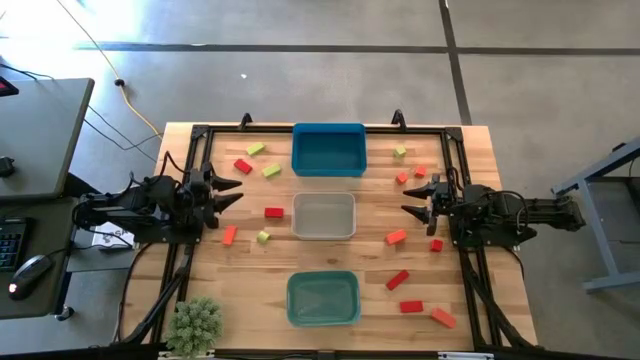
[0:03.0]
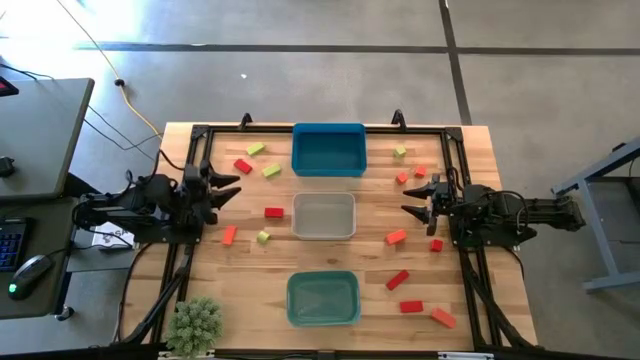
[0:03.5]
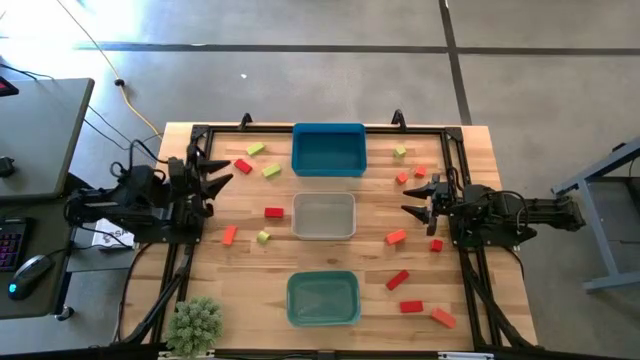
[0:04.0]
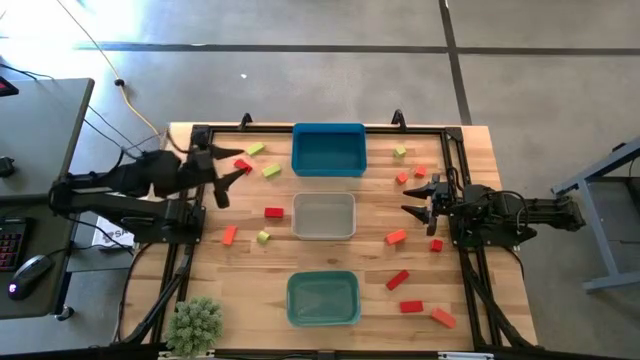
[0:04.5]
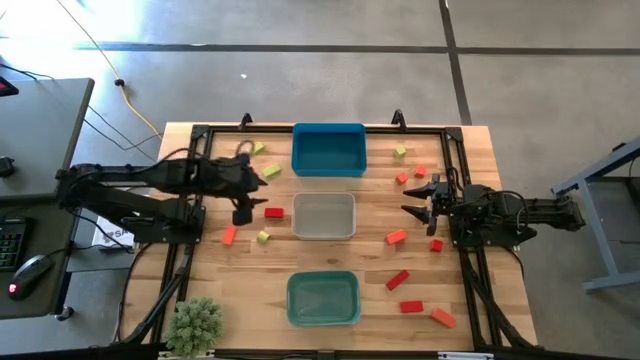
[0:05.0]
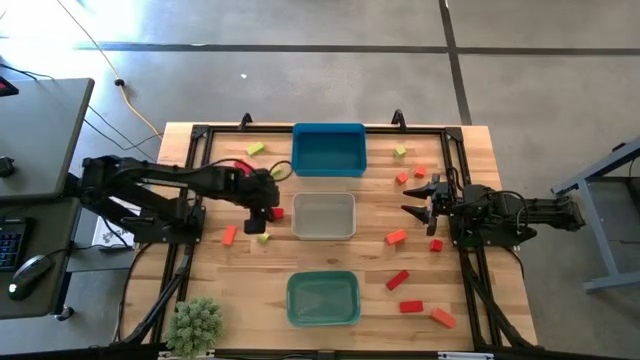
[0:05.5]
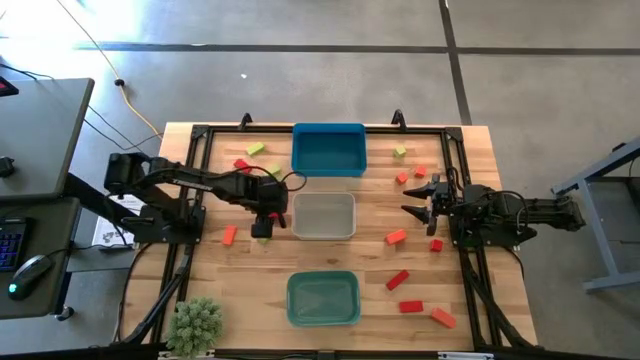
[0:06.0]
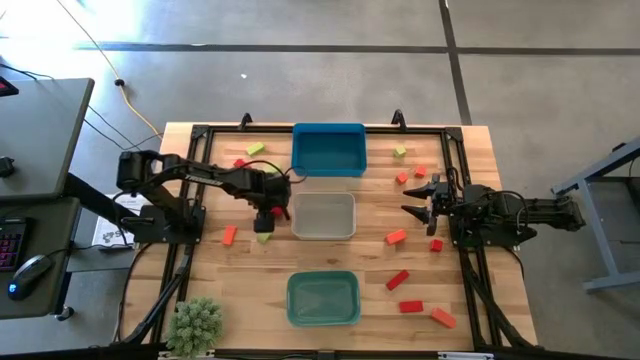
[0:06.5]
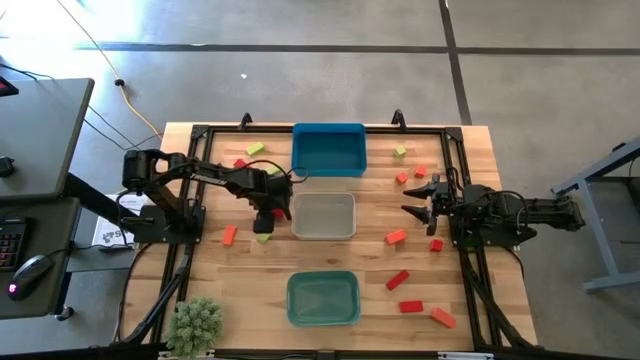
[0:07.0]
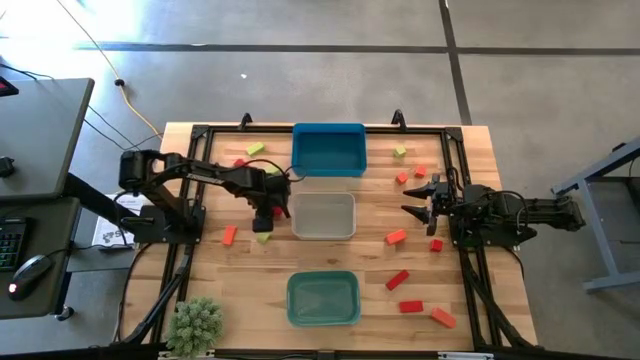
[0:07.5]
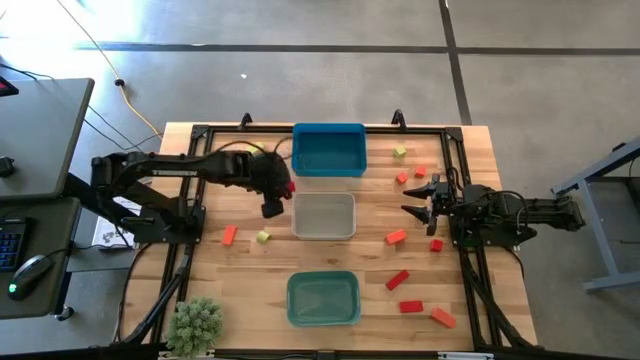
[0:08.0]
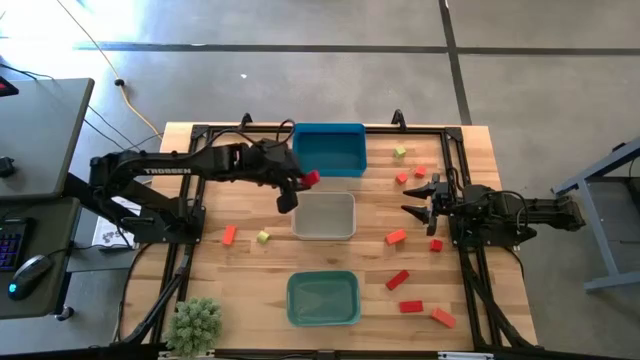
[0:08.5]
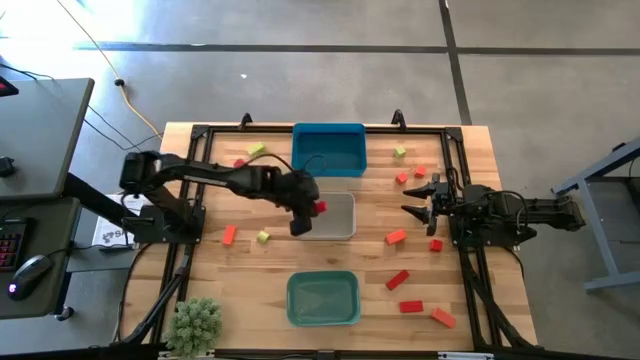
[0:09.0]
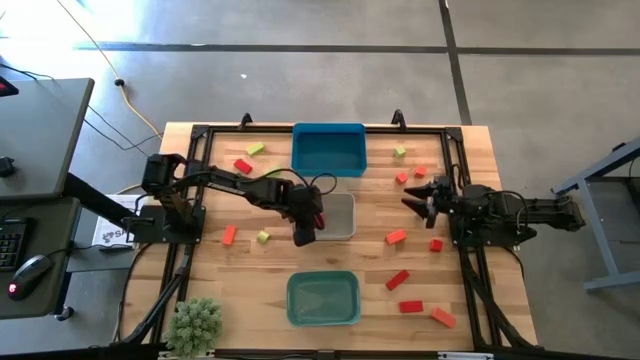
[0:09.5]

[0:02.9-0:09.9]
Task: Sort & place blocks by color
Put the red block into the gray bin

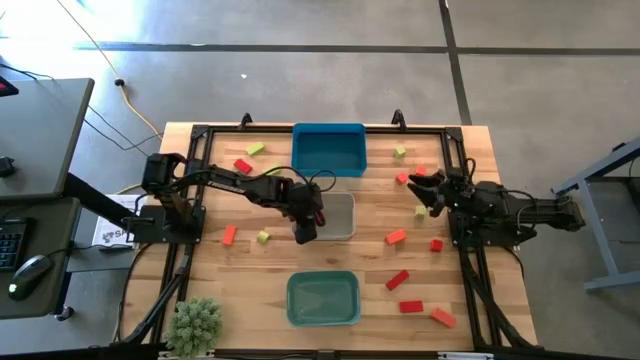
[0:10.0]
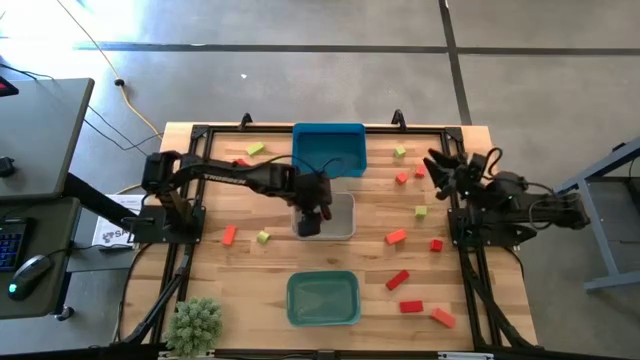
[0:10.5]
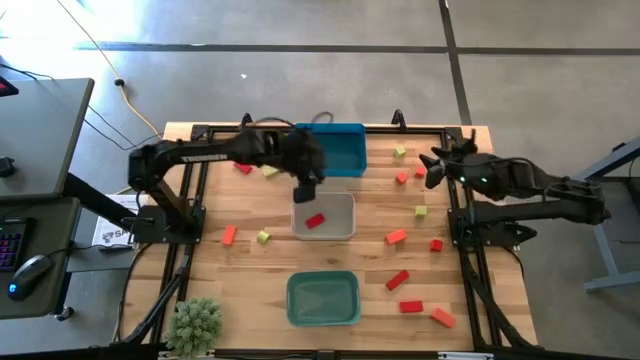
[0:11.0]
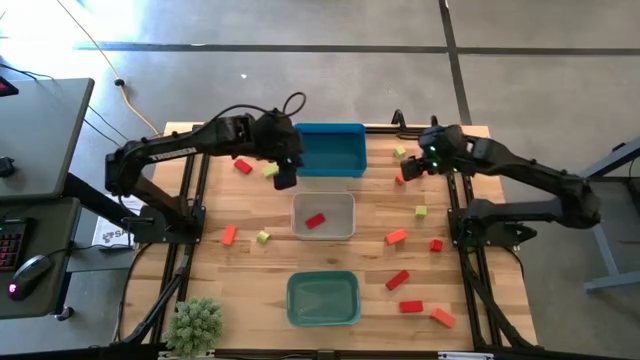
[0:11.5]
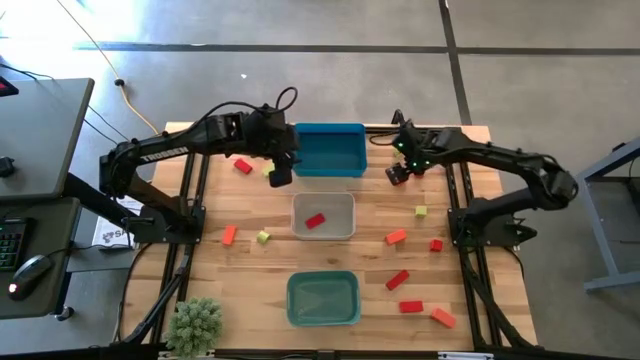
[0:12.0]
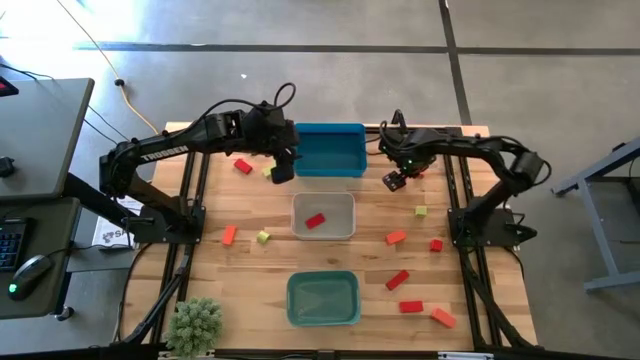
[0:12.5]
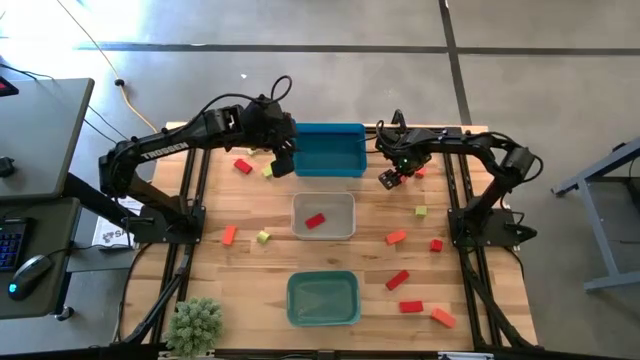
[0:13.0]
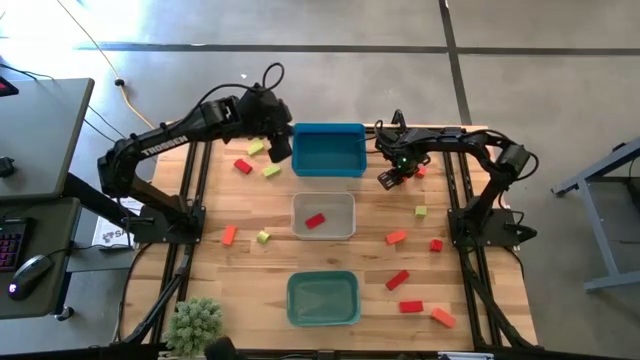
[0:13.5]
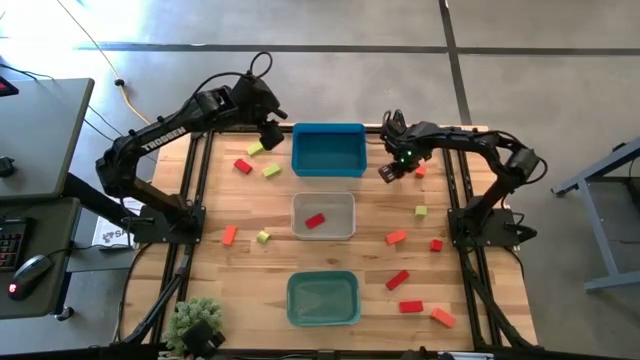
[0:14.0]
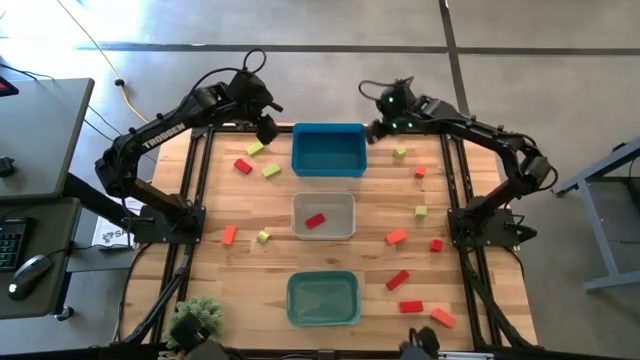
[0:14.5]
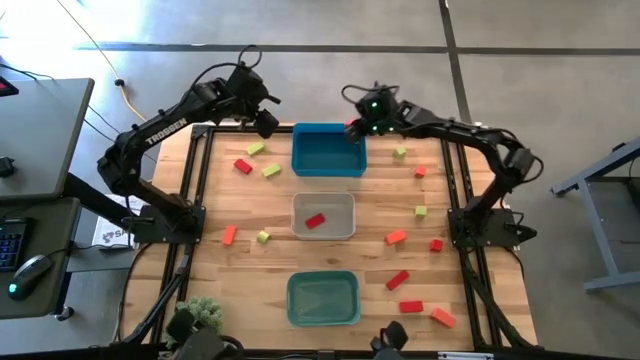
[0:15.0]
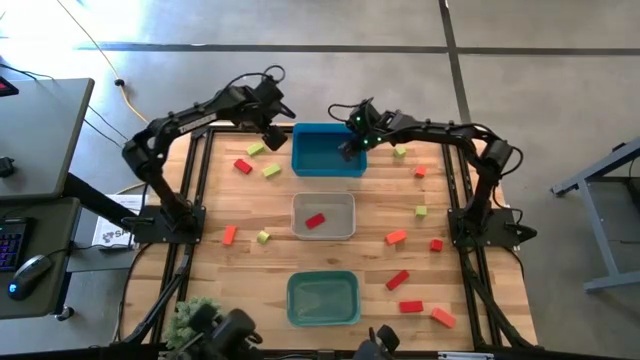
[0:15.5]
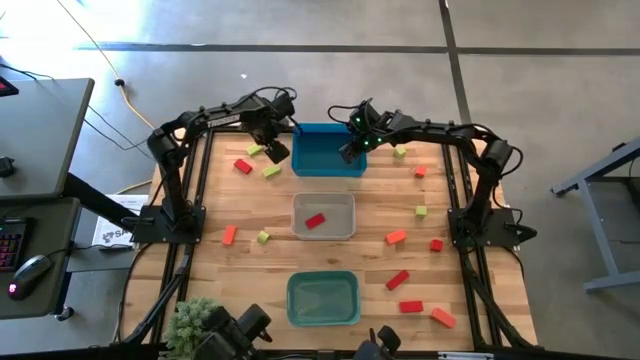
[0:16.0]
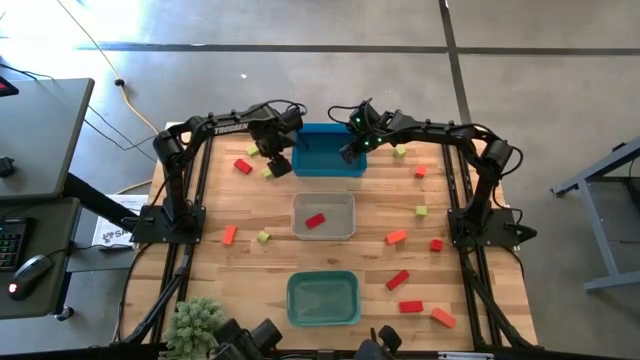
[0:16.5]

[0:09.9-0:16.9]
Put the orange block into the blue bin

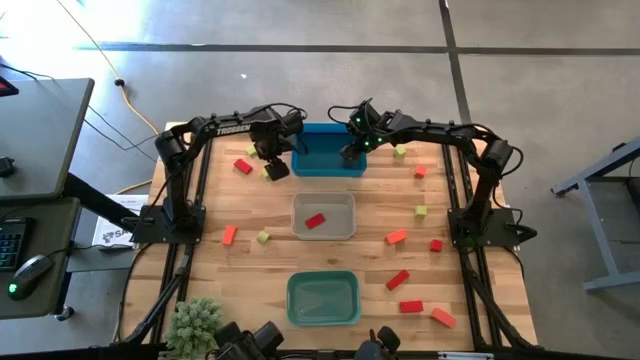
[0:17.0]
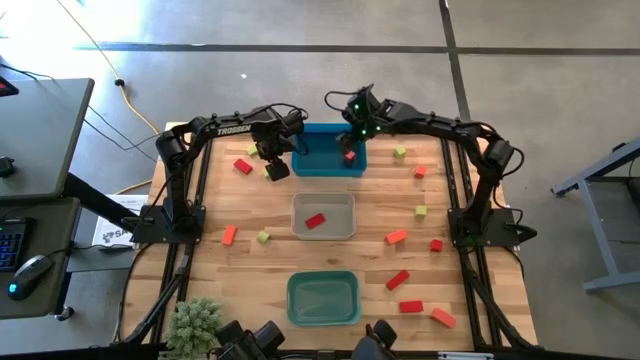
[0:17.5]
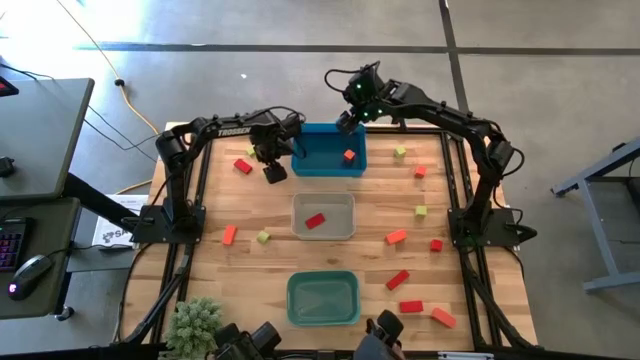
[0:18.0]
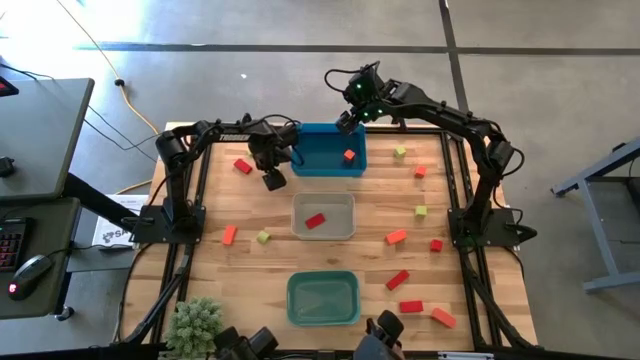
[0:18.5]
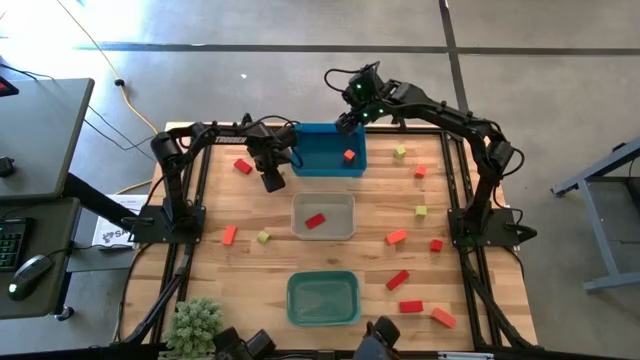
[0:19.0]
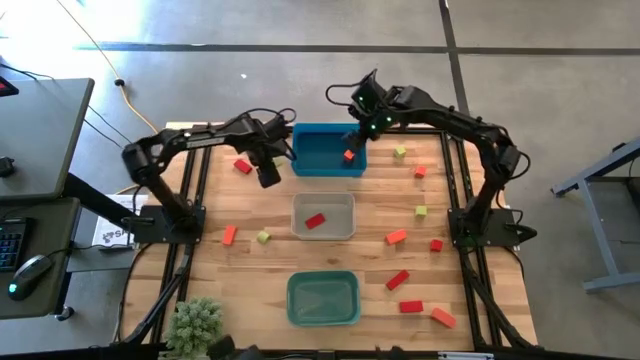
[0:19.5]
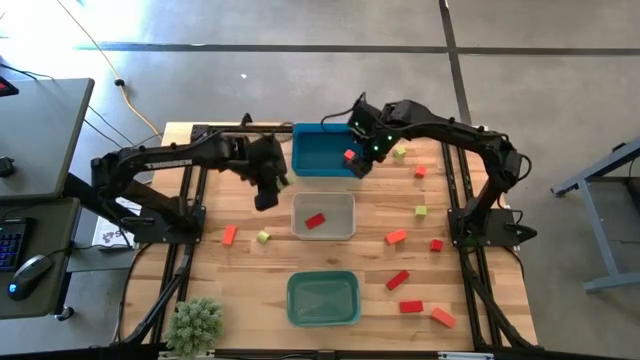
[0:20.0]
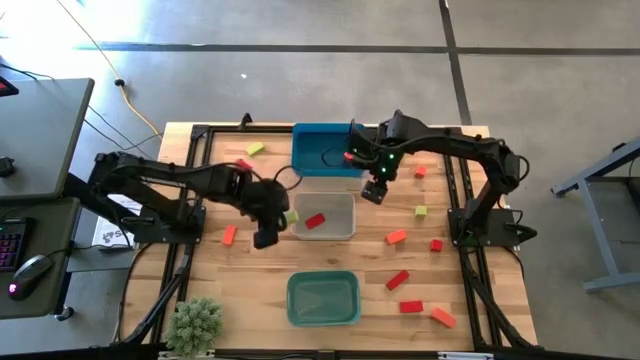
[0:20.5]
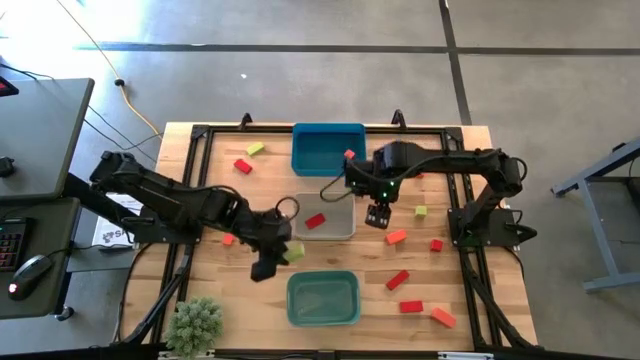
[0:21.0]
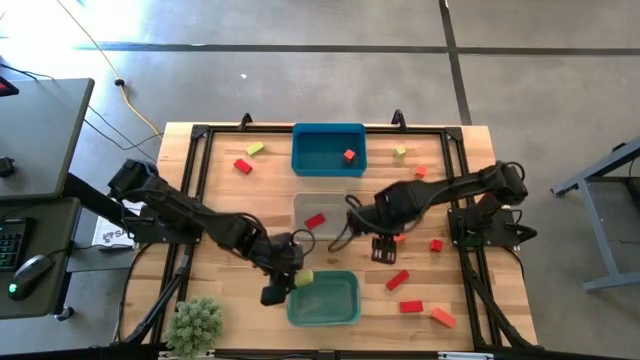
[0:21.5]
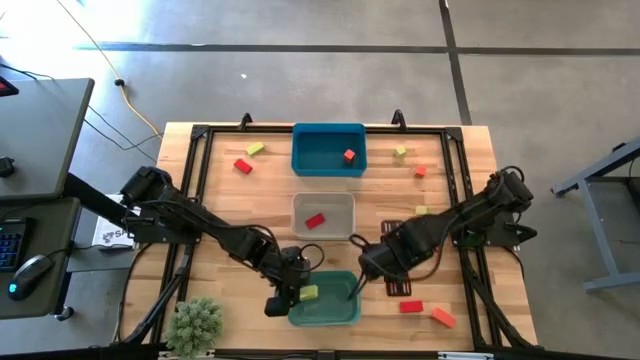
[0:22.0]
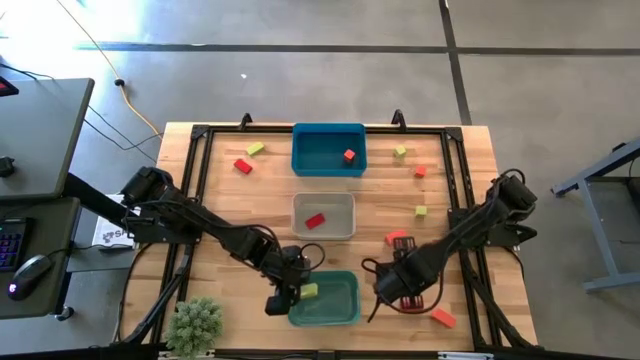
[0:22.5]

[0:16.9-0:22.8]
Put the light green block into the green bin

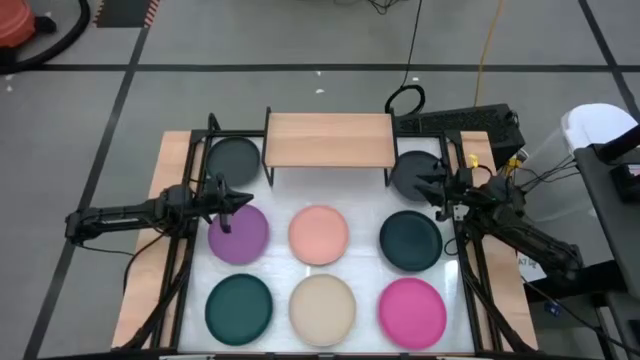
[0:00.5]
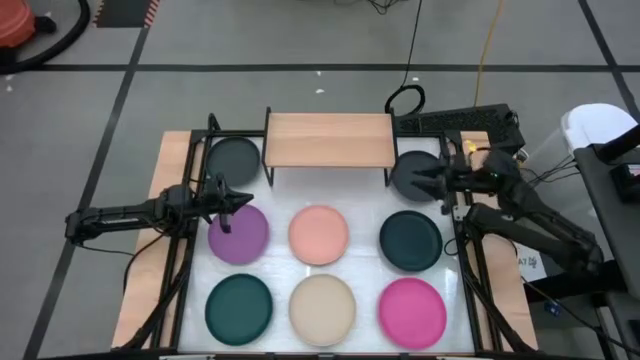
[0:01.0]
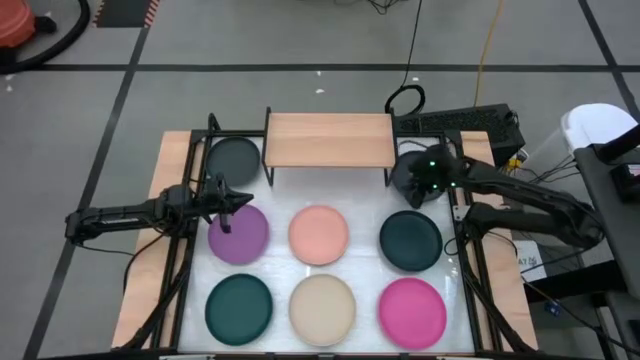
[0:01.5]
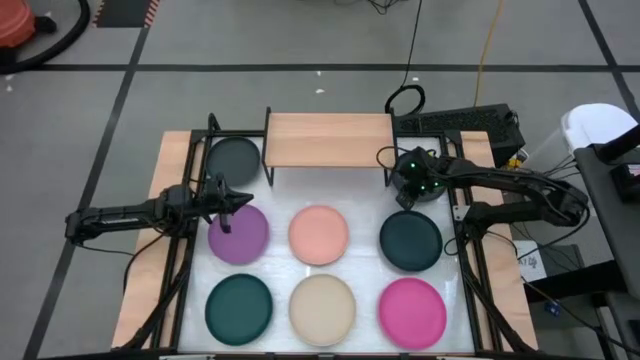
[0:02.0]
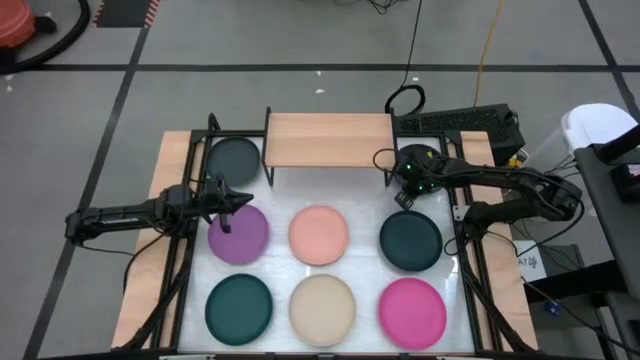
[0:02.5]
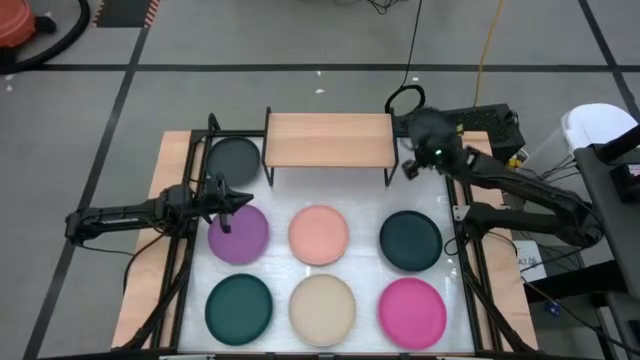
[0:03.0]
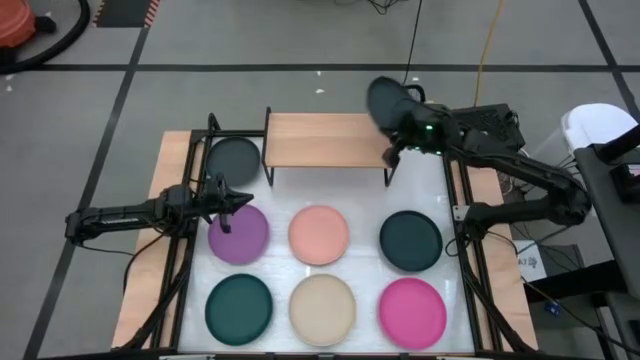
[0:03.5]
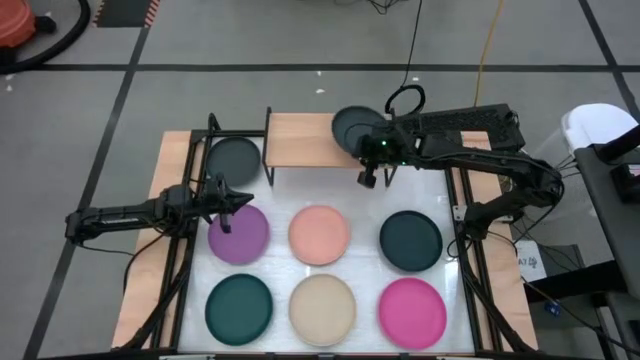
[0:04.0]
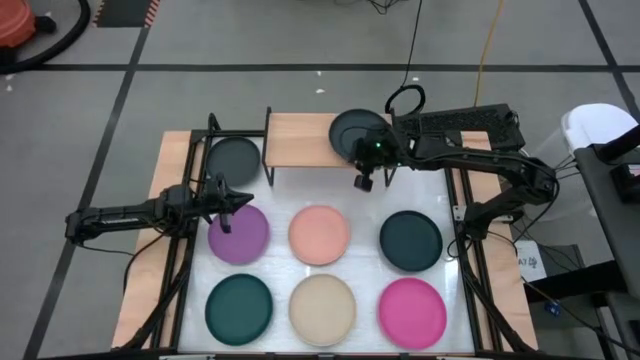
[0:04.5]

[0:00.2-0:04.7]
Task: Place and stack plates onto a shelf
Put the right black plate on the shelf
